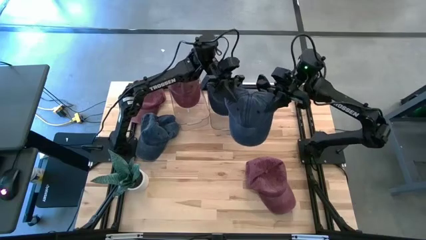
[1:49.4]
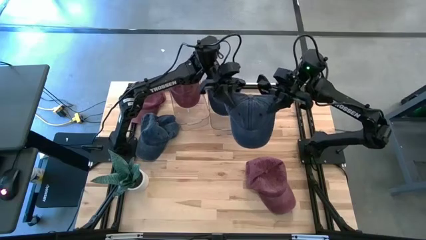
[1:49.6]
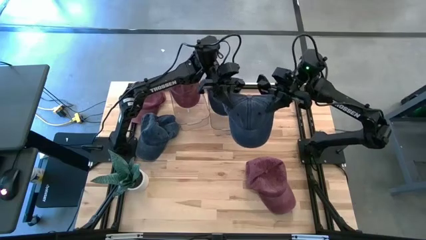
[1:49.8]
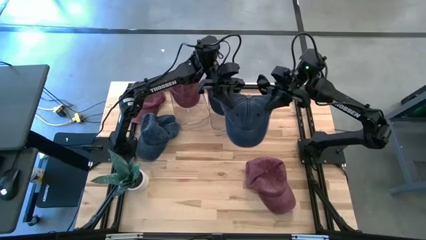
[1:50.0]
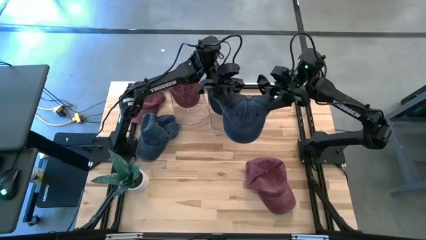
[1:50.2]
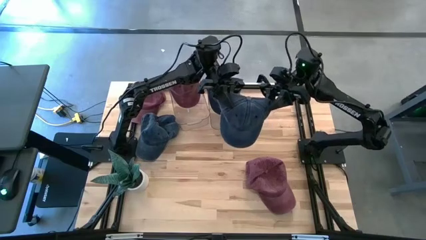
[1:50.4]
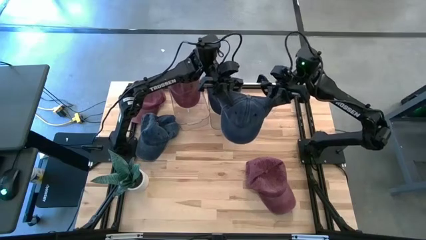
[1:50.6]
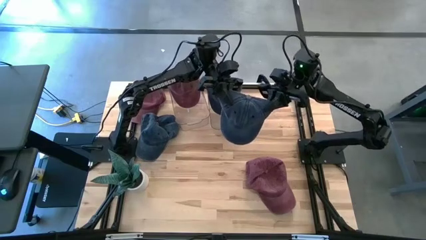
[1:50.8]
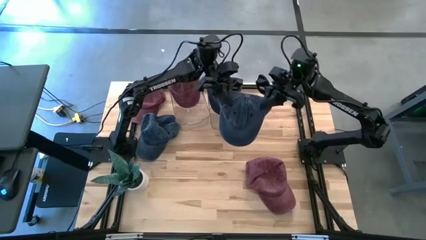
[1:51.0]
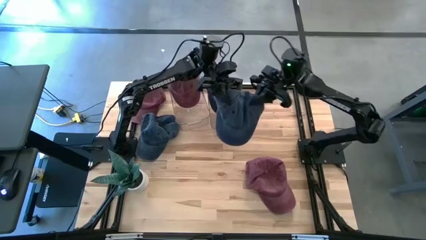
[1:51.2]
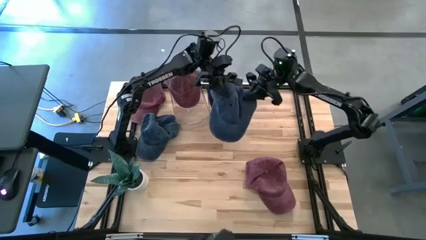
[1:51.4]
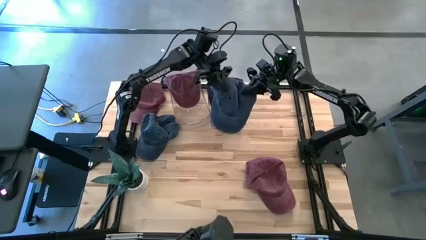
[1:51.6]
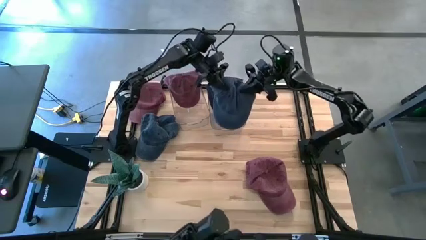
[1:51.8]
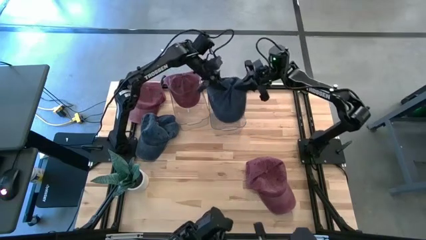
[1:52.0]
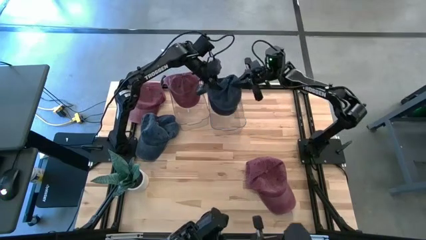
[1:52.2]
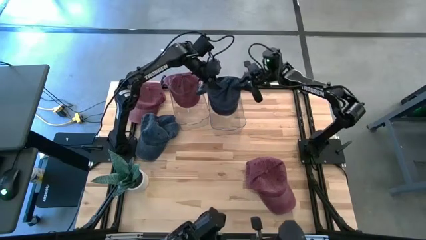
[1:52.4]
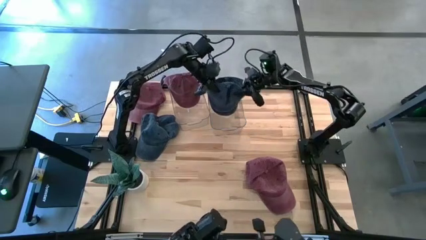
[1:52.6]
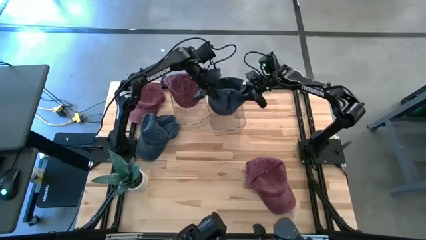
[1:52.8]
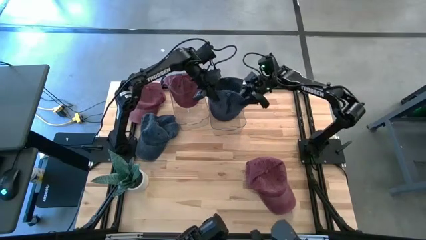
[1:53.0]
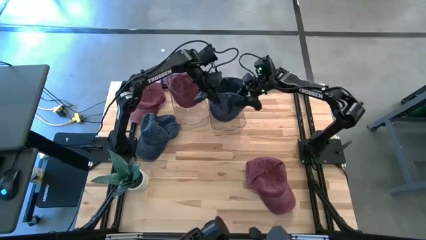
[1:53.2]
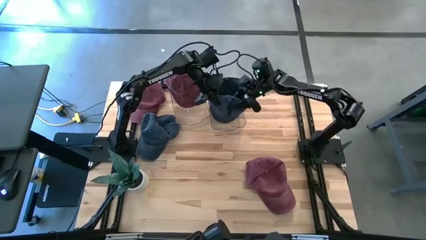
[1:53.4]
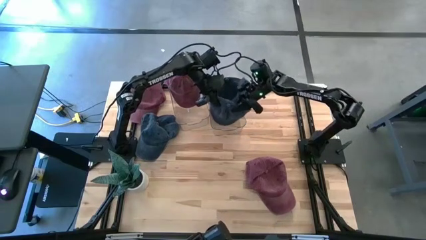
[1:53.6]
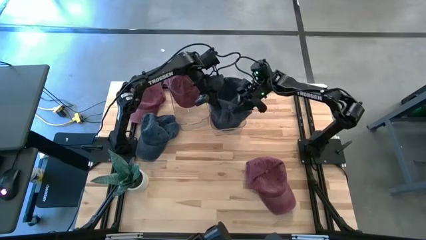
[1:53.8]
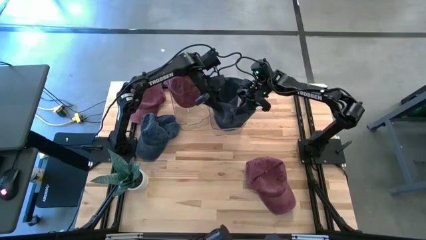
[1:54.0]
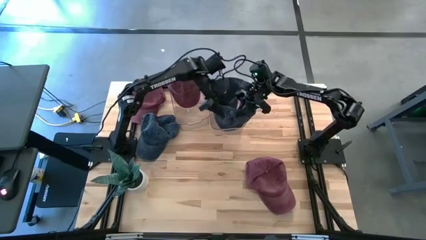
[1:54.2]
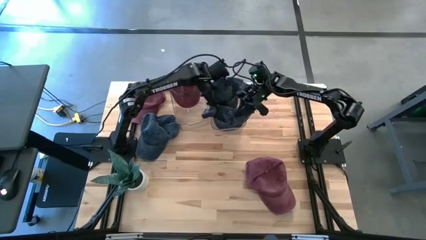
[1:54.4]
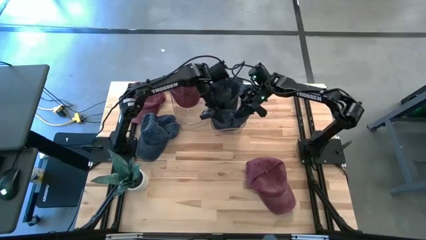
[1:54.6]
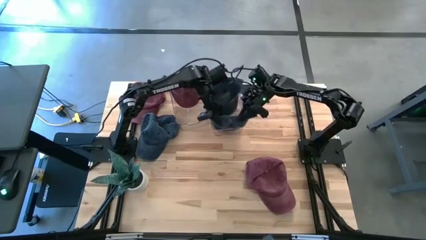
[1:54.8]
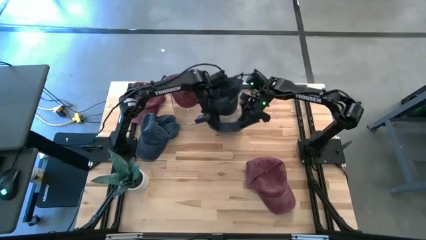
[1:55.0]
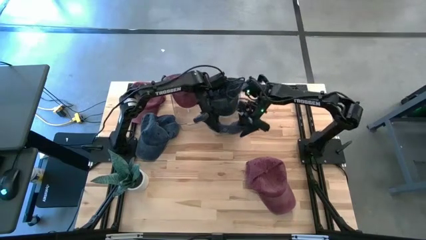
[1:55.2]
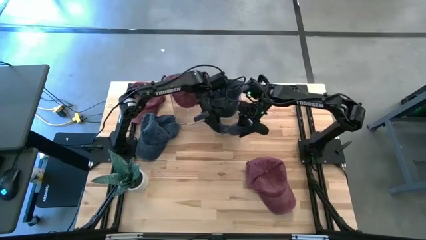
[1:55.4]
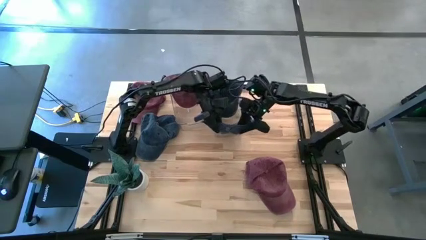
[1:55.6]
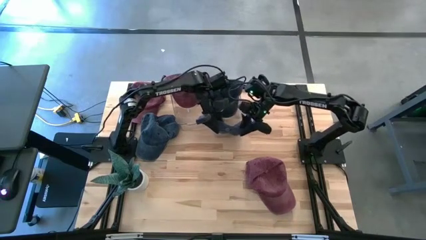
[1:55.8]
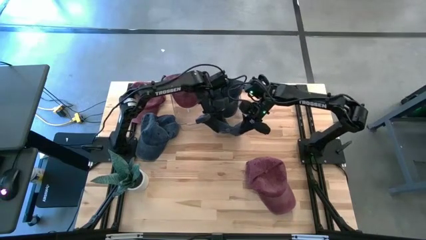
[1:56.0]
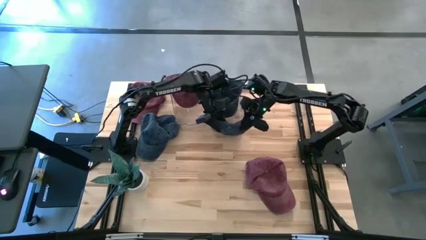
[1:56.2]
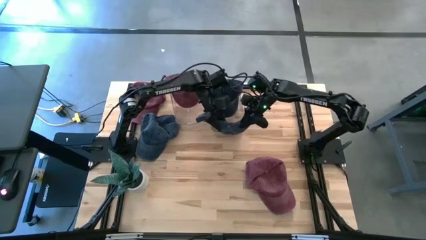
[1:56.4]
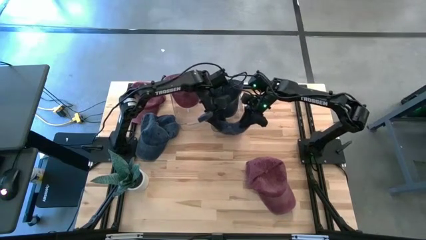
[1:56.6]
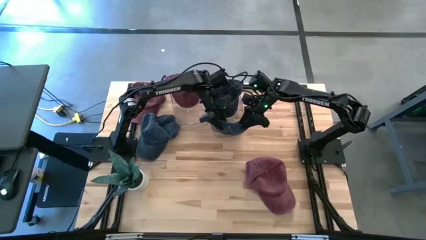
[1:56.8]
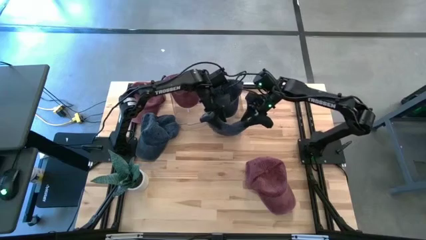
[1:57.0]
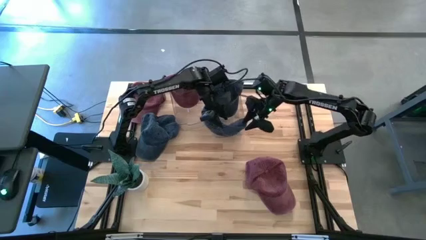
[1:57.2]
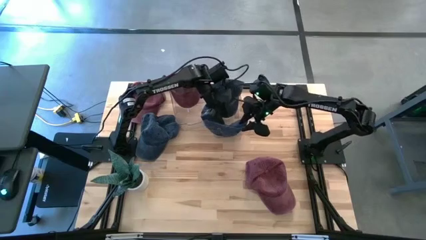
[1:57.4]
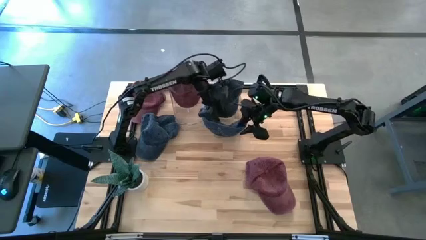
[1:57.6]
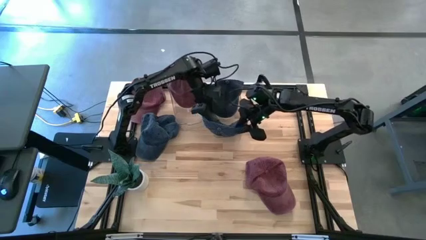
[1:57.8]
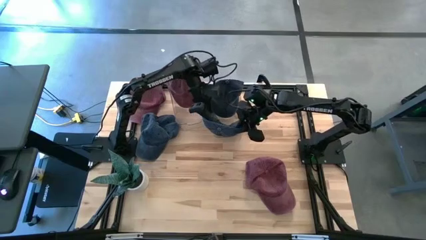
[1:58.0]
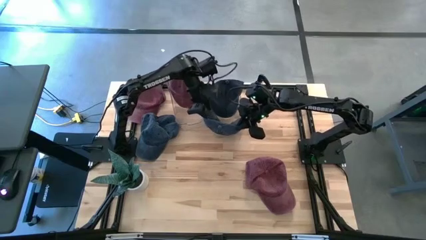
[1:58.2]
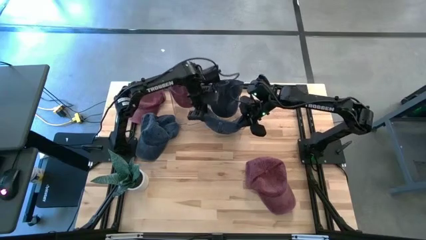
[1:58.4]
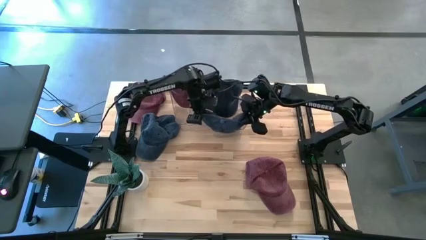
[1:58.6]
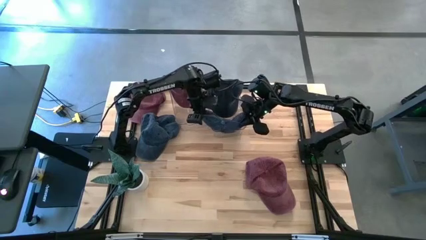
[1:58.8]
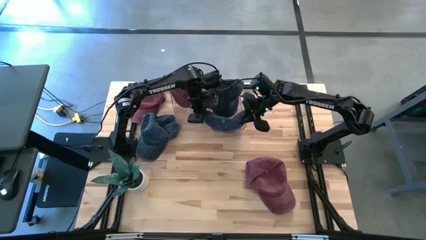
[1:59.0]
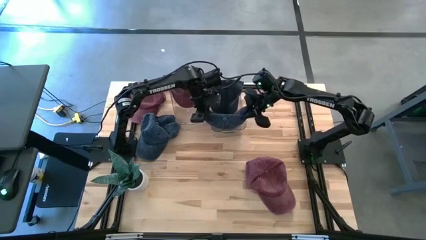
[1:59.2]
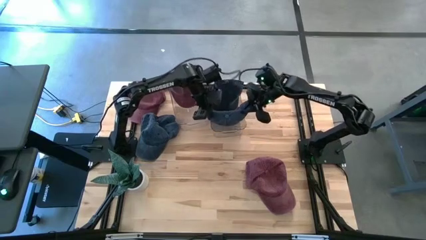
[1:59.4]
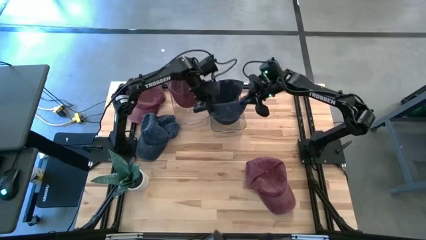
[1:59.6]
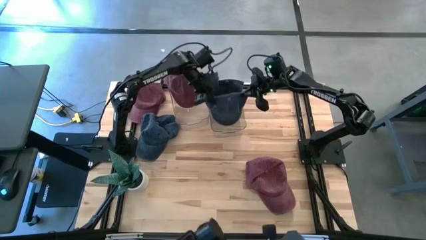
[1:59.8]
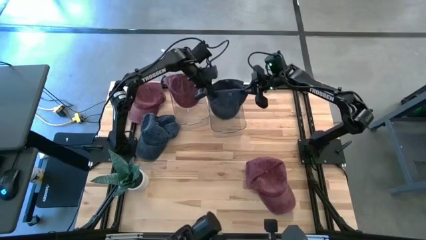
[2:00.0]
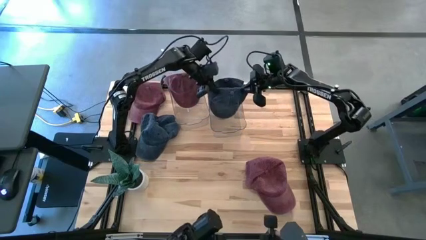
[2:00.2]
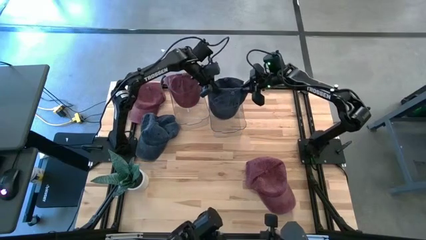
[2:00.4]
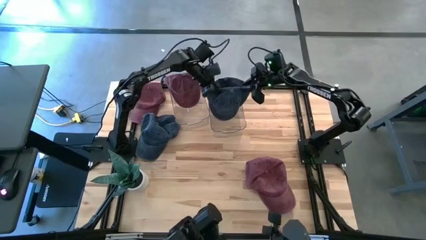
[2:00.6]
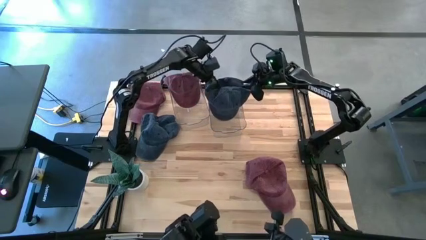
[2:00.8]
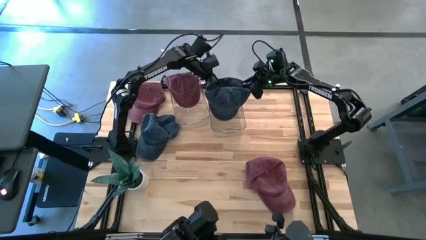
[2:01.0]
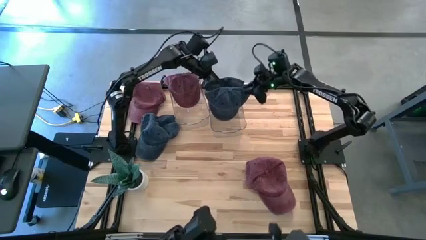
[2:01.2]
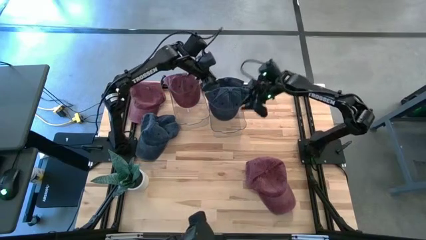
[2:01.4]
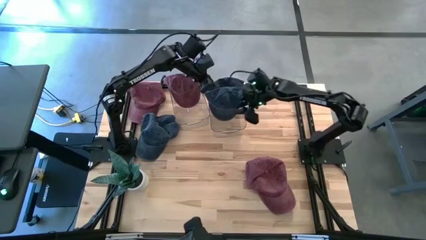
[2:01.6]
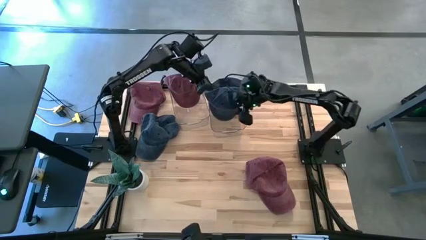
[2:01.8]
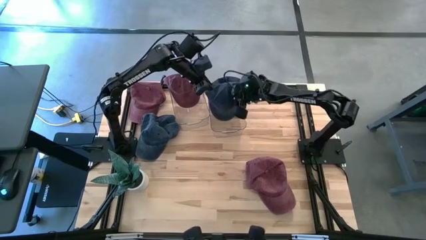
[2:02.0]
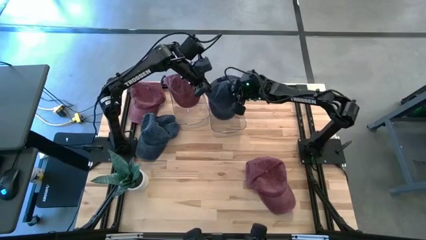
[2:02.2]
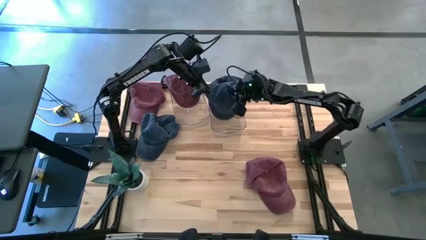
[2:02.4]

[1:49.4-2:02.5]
Task: Pick & Place hat
Put the right blue cap into the right bin

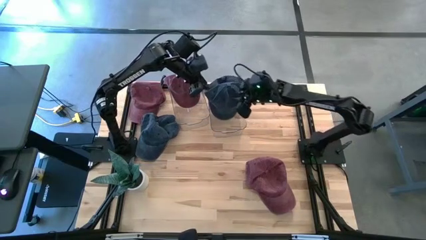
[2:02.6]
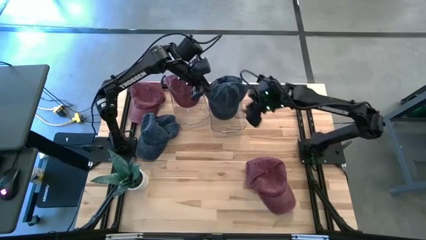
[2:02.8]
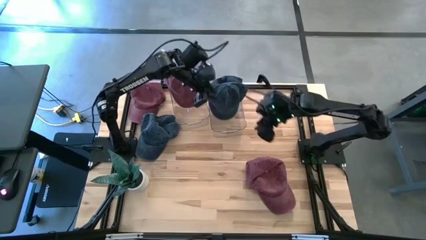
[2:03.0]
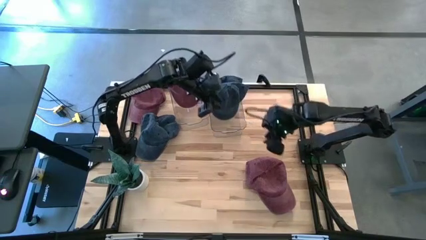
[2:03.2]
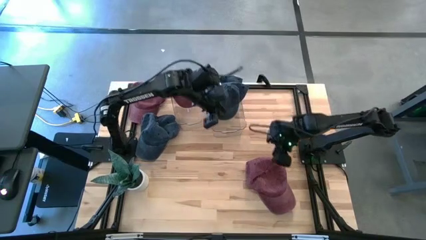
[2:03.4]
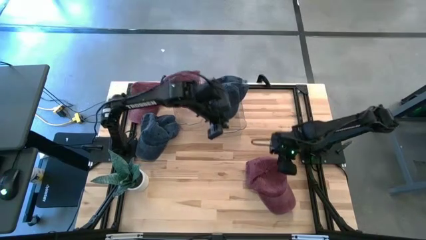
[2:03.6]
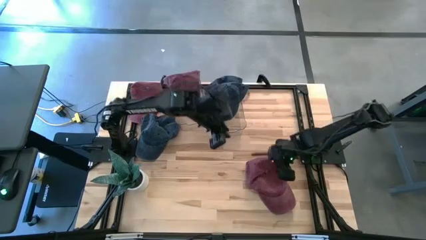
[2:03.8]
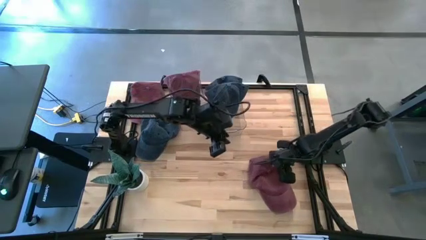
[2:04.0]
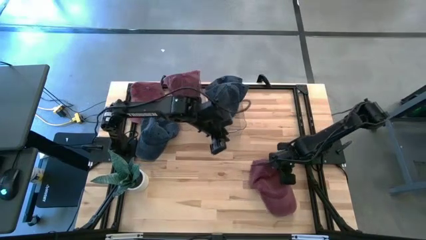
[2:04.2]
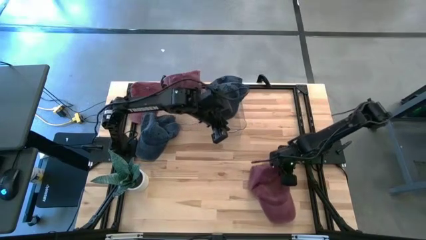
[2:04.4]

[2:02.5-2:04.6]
Put the bottom red cap into the left bin
